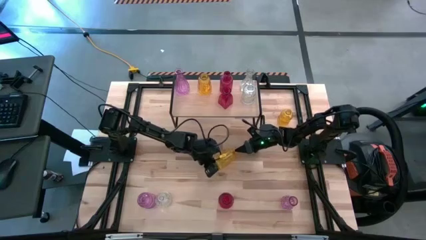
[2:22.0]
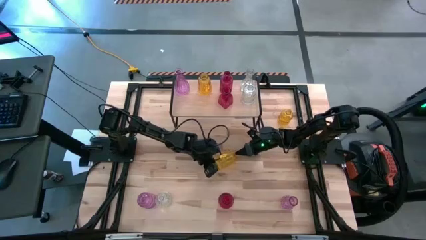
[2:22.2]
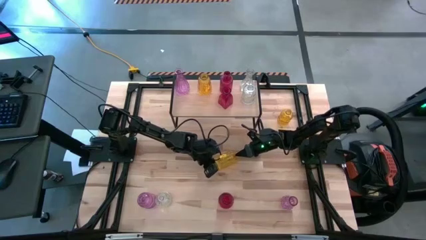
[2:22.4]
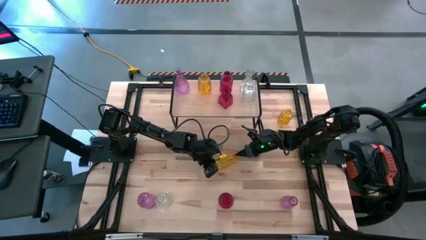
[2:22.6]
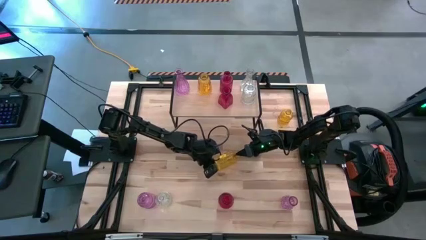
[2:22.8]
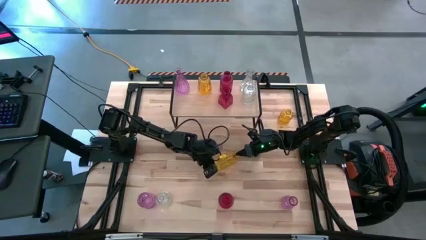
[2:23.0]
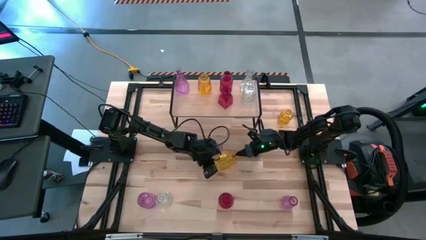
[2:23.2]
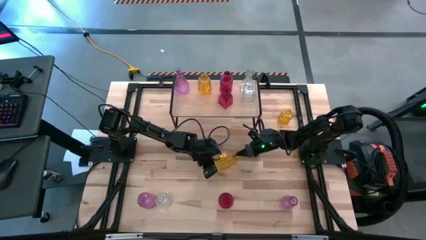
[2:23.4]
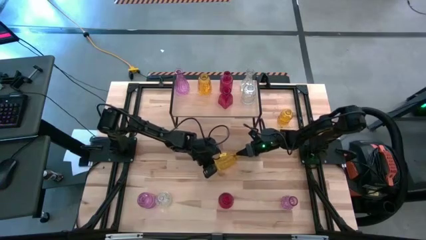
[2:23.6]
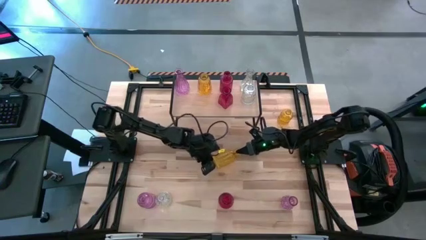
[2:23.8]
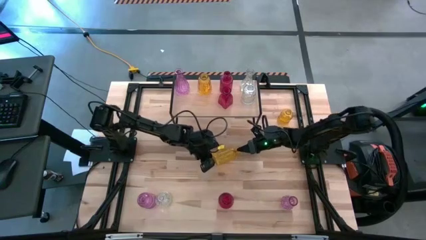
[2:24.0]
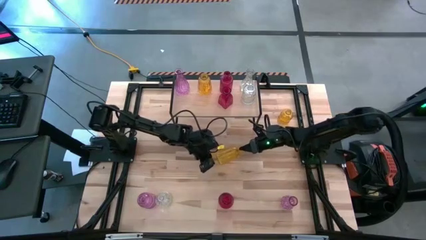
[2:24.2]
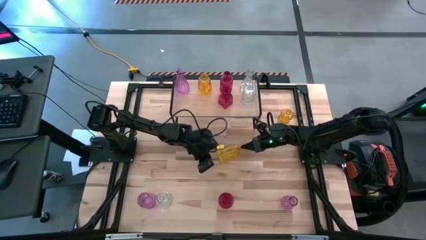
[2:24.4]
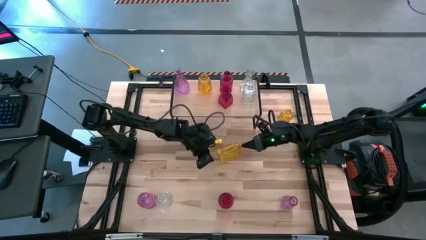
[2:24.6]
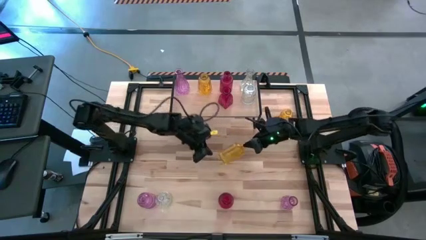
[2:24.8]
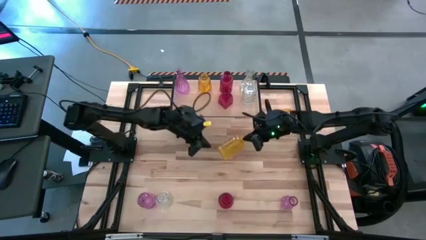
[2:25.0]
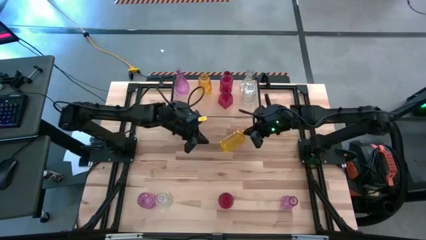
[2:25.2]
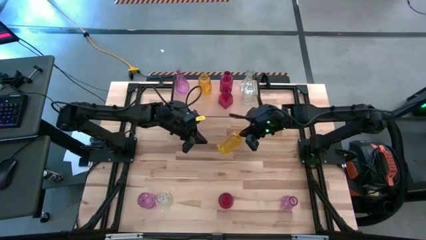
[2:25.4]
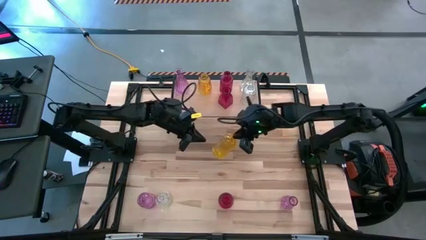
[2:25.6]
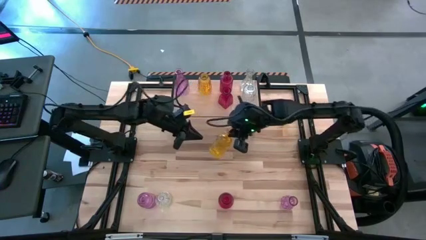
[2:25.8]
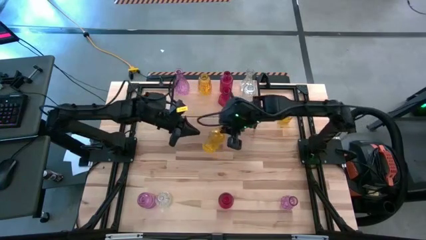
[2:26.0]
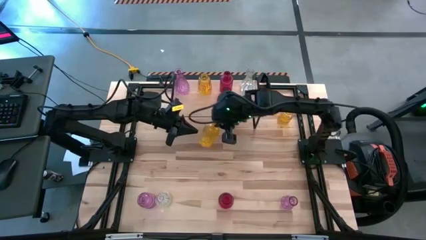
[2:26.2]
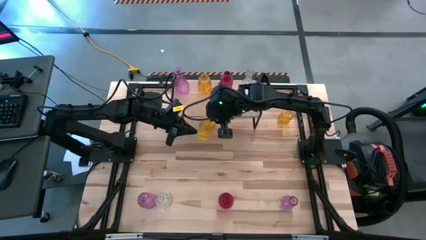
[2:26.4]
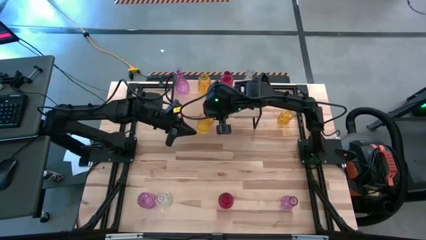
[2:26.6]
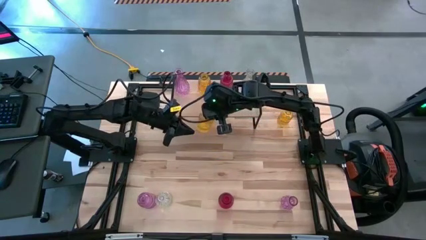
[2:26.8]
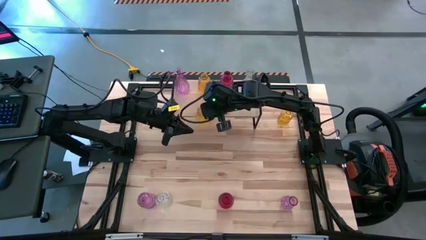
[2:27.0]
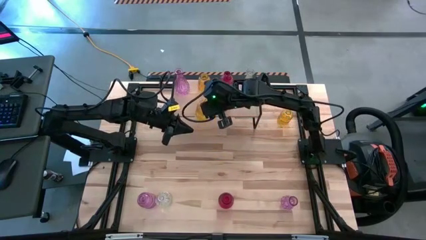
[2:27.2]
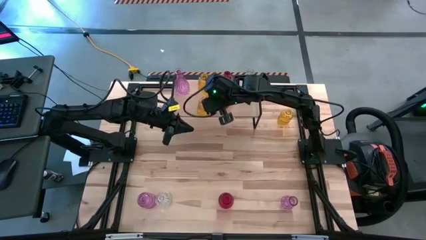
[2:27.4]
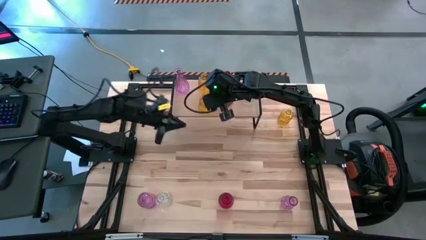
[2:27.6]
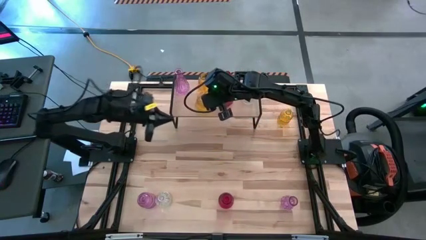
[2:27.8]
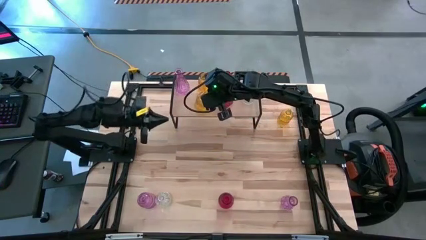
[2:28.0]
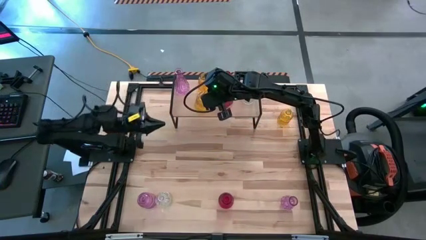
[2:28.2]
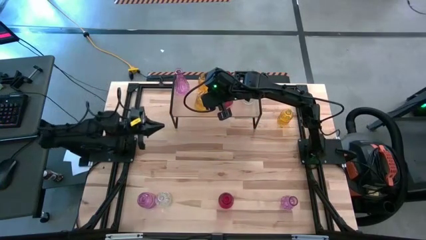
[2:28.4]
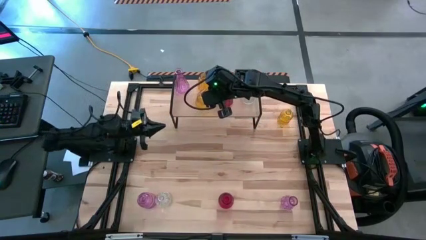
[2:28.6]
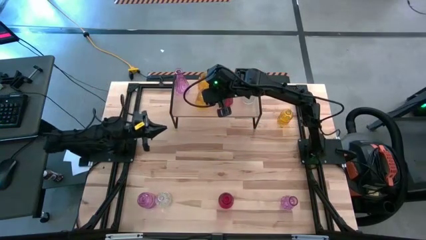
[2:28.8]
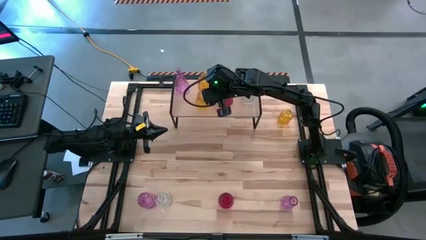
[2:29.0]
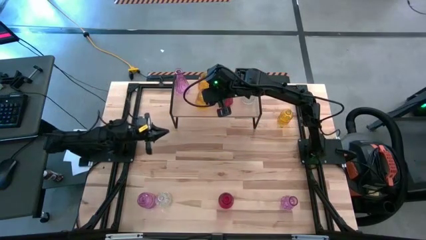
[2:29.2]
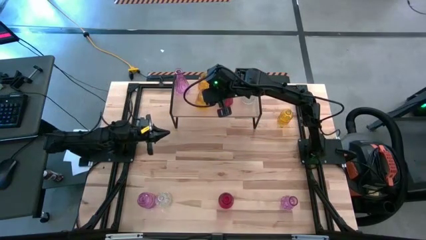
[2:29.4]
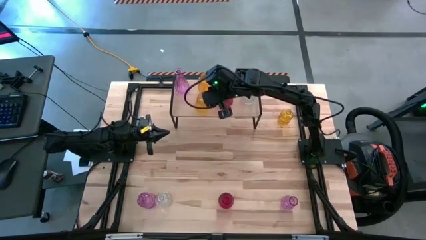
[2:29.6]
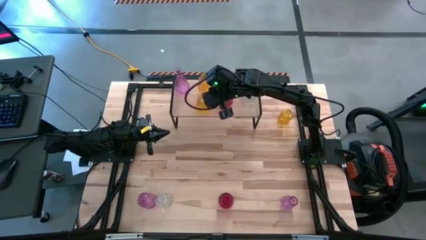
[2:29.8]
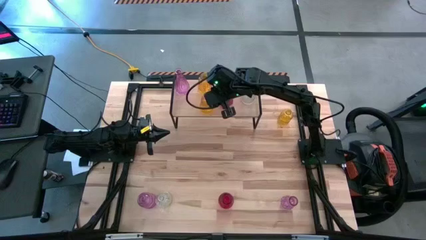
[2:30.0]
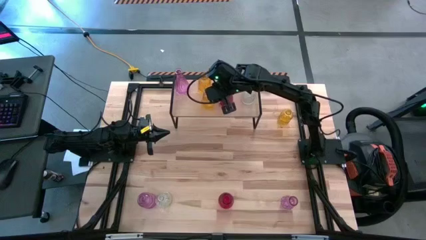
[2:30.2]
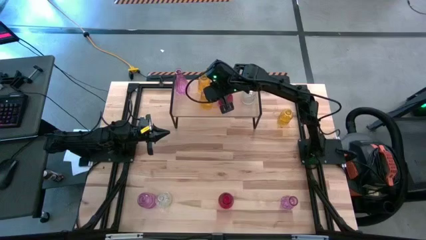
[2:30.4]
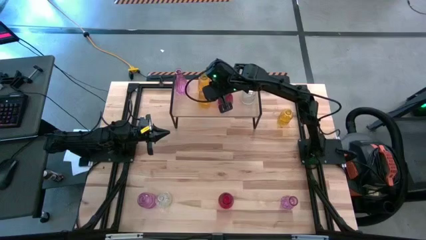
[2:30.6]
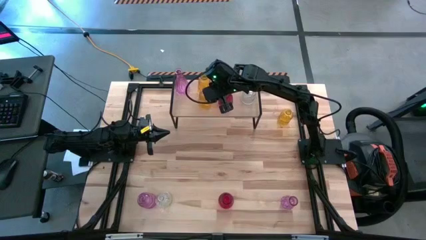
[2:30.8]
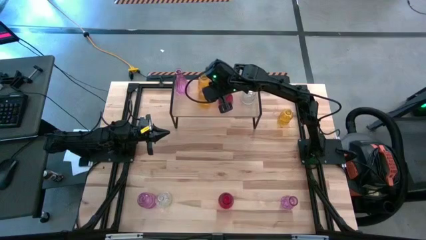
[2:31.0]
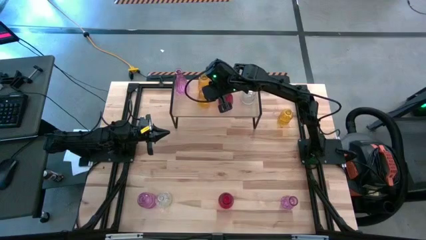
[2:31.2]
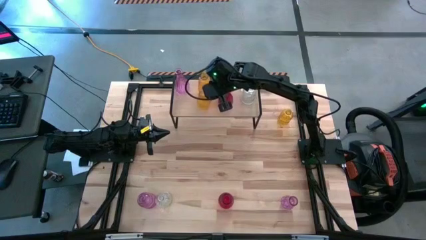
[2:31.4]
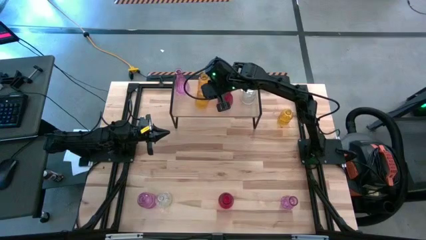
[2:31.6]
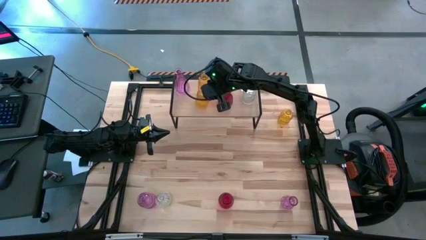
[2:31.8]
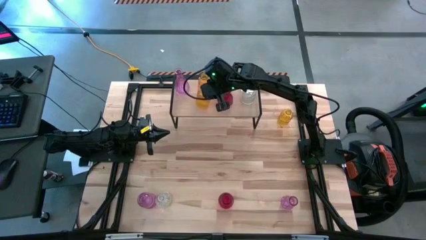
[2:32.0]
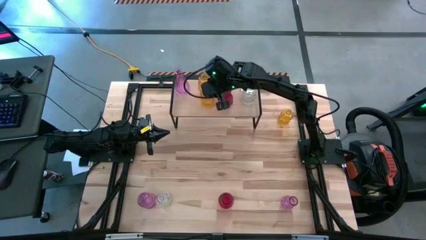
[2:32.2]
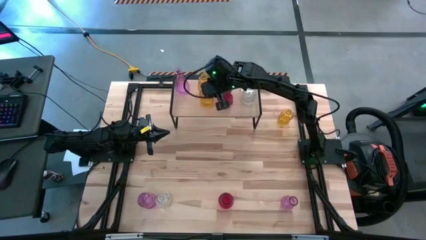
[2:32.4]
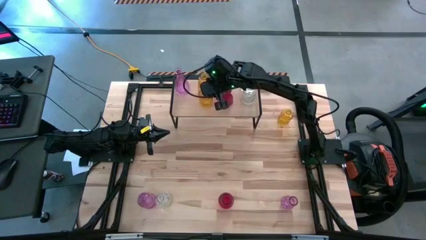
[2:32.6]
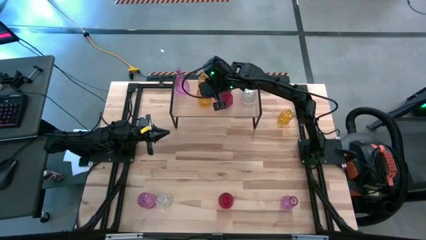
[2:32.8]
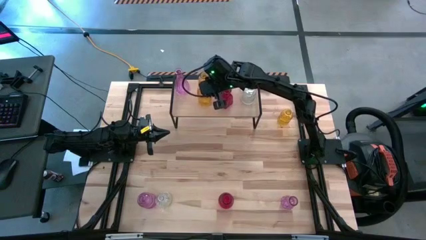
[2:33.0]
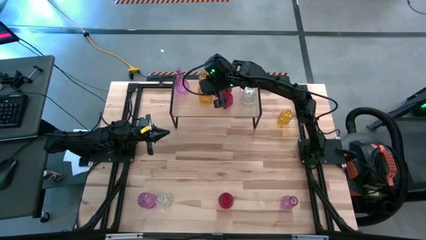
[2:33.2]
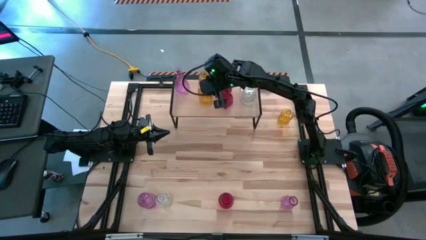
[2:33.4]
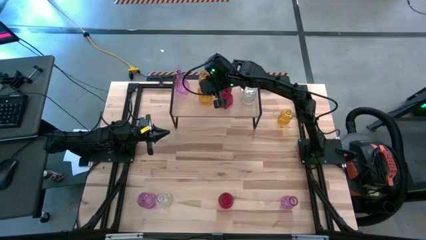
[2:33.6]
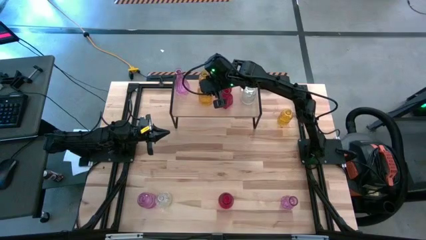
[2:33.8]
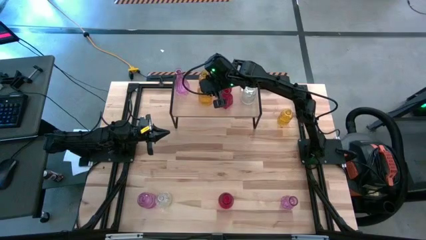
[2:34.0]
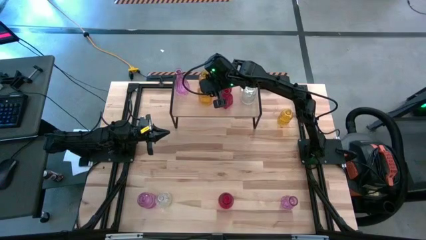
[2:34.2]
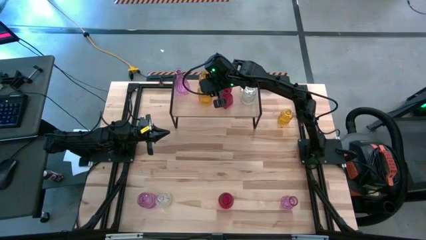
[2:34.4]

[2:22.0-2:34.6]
Task: sort vases onto shelf
Put the bottom yellow vase on the shelf and align it with the other yellow vase

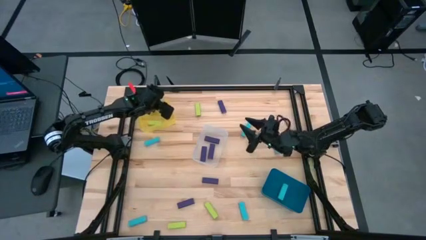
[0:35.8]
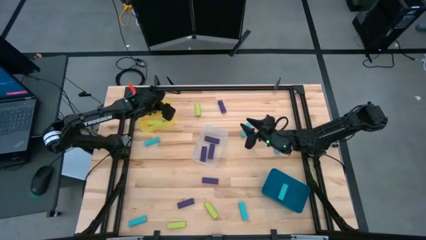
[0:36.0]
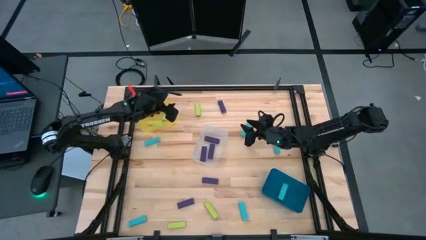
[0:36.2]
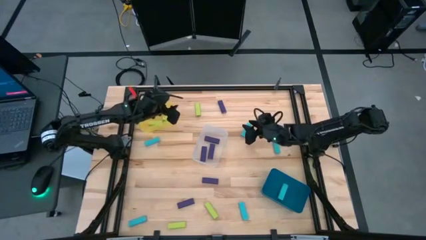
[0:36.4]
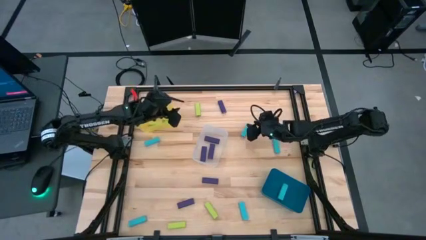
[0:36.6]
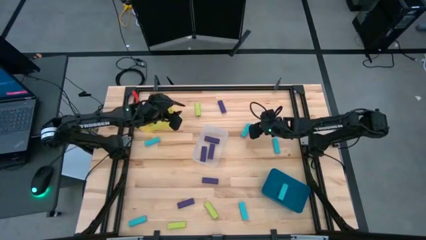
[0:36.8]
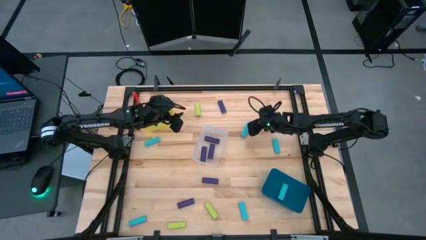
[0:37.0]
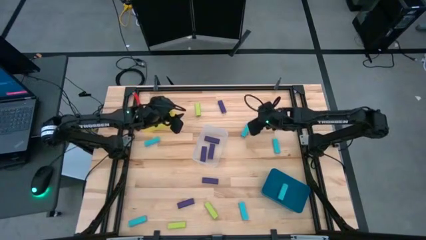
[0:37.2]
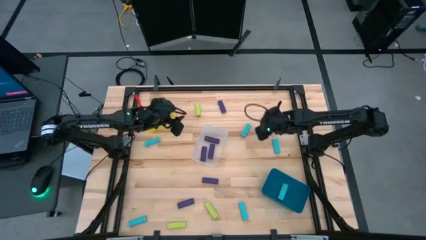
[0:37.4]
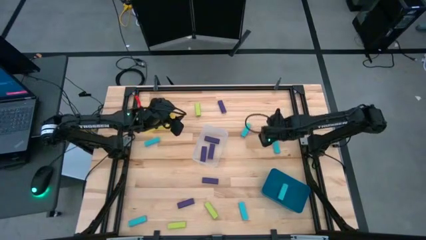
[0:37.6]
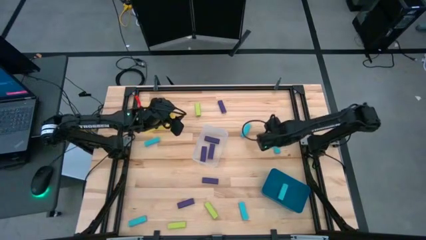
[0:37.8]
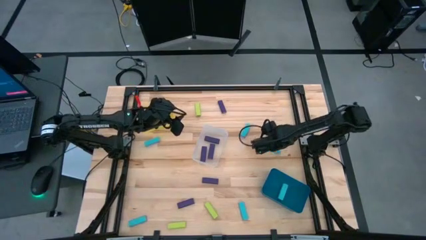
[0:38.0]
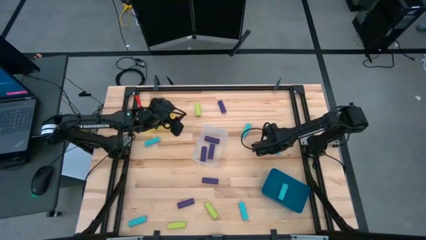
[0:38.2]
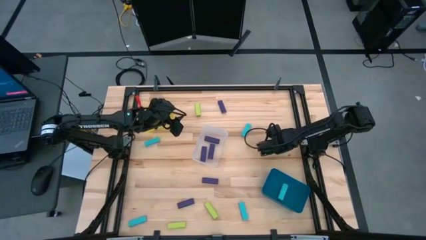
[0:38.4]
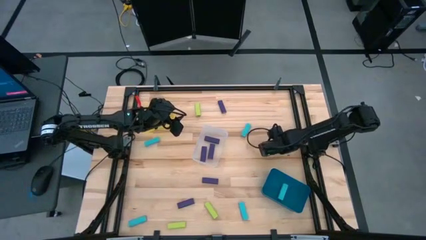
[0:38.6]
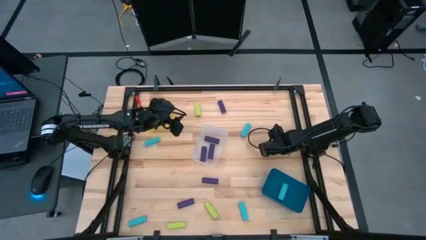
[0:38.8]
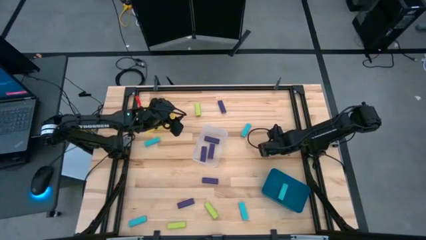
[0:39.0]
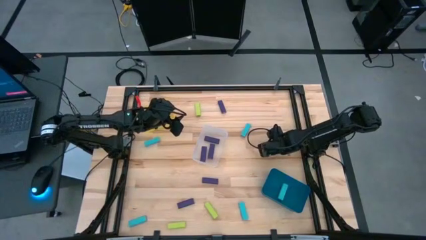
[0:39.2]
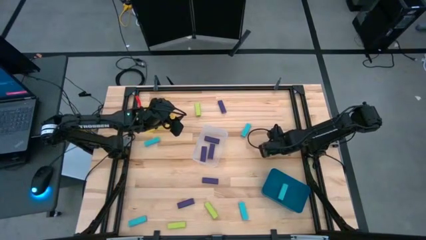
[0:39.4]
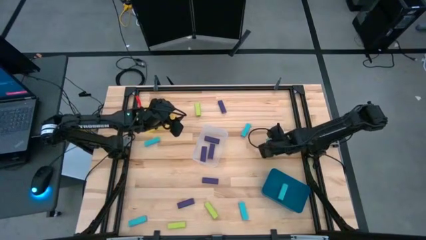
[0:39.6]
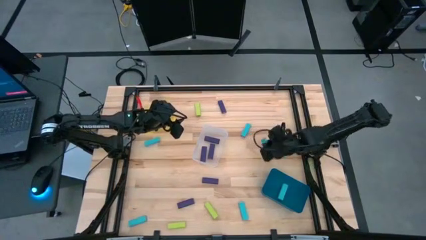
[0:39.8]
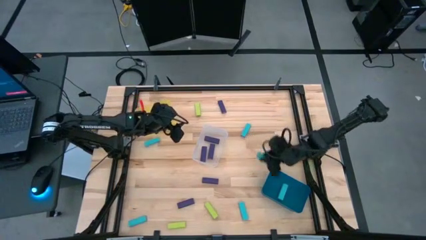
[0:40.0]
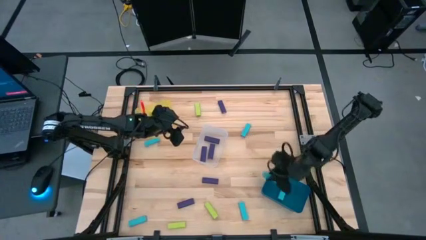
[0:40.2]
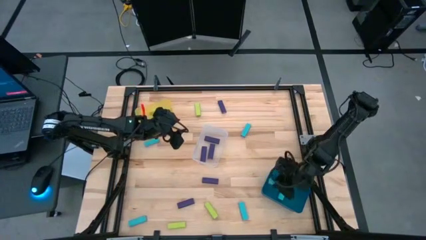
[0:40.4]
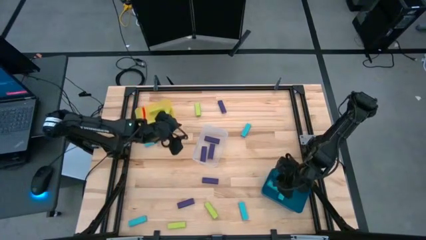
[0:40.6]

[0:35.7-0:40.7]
Task: Sort blocks
Put the blue block into the blue bin
